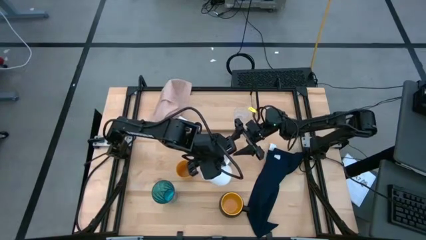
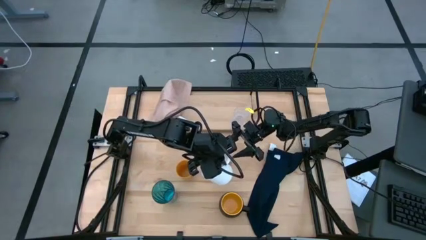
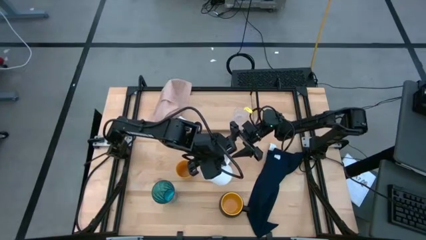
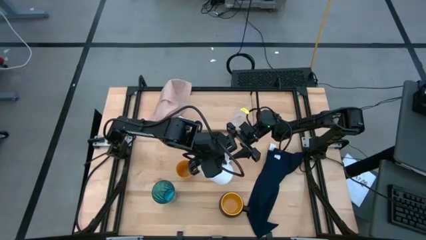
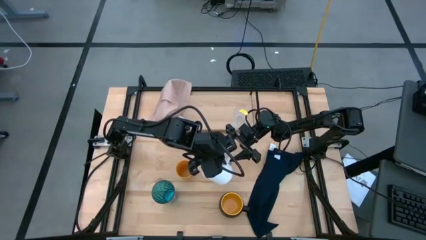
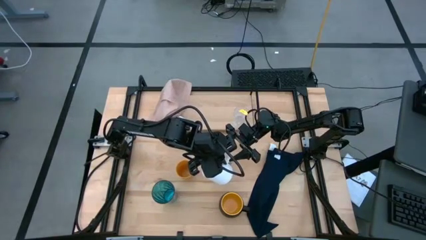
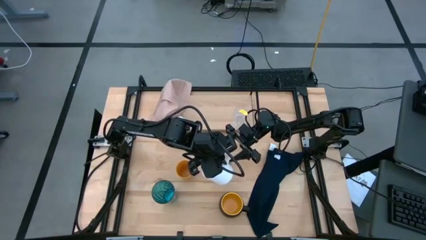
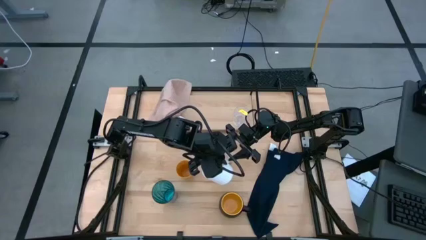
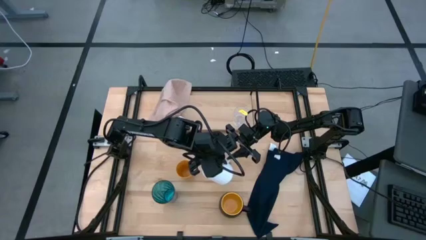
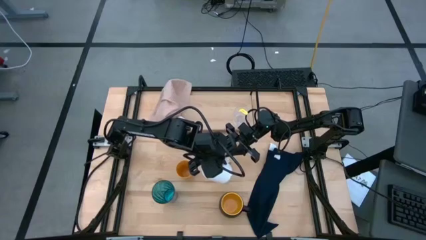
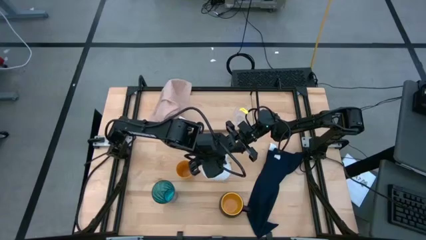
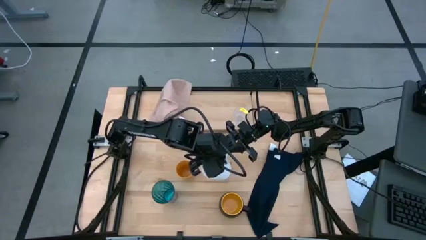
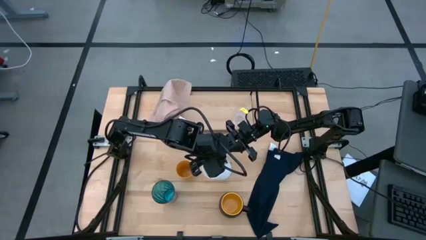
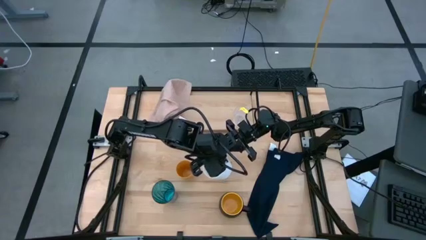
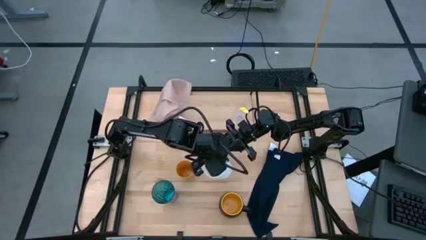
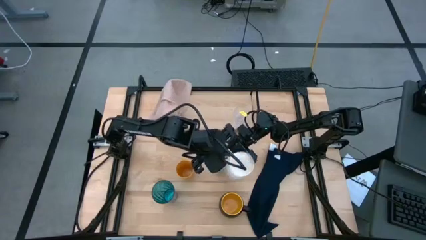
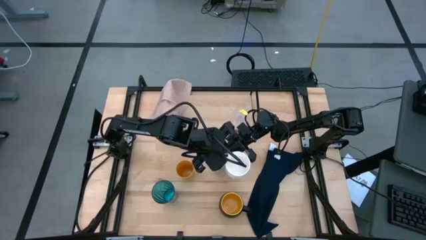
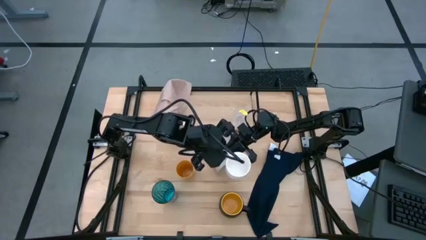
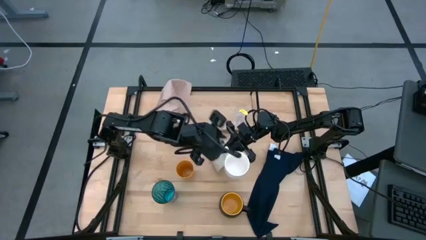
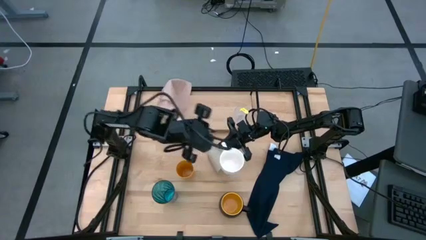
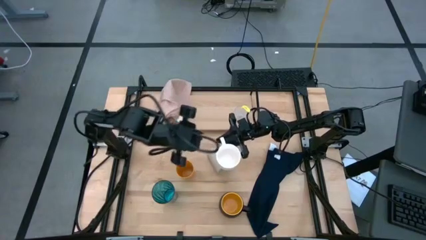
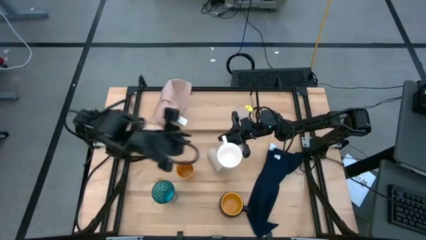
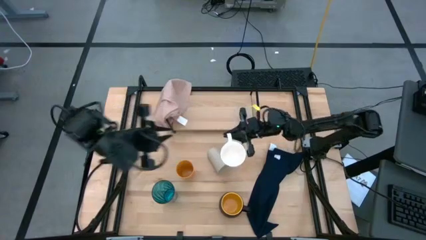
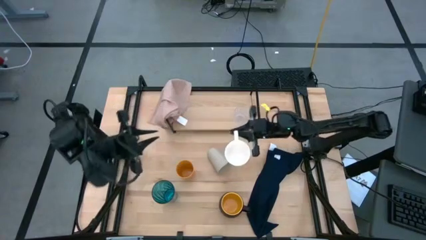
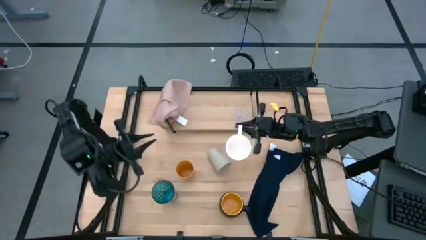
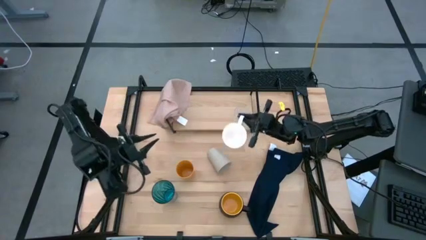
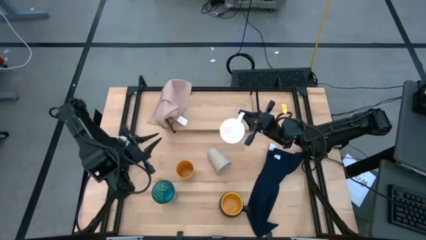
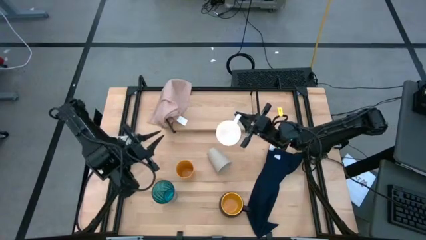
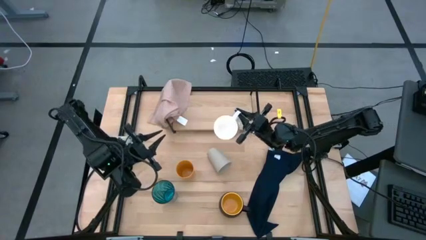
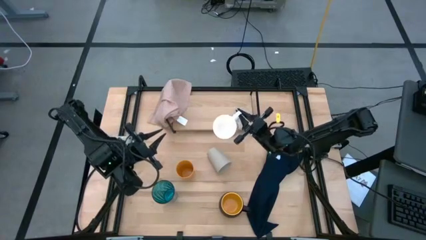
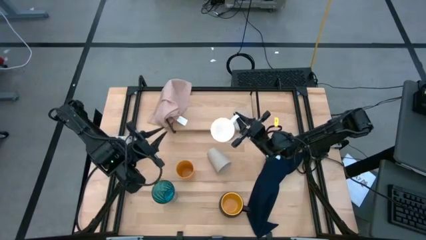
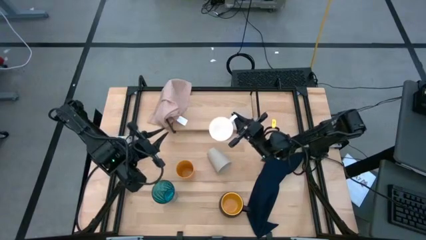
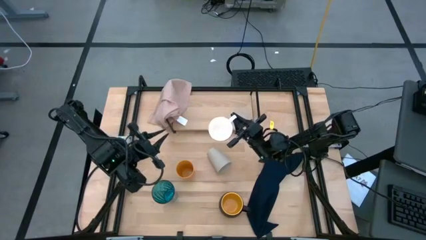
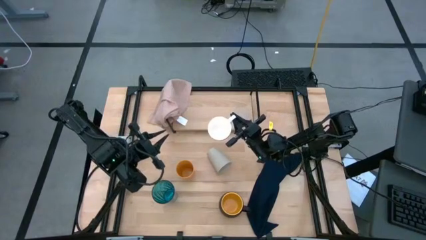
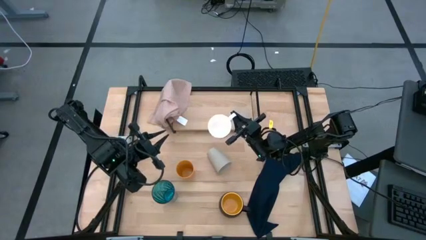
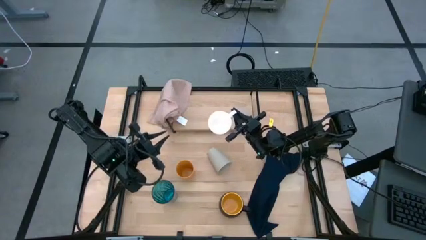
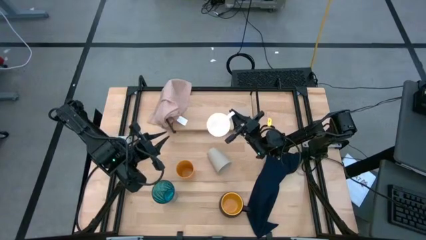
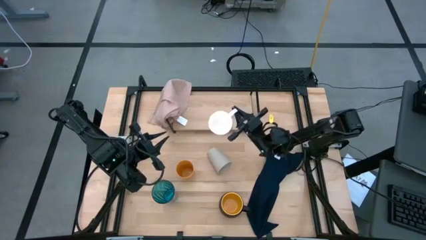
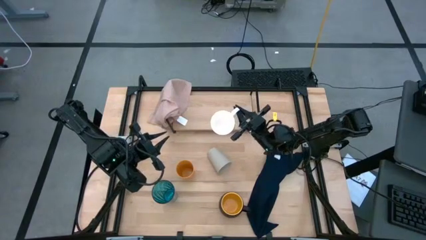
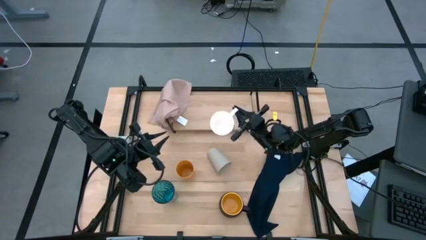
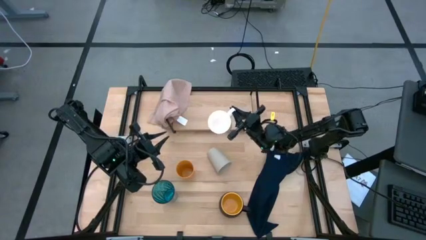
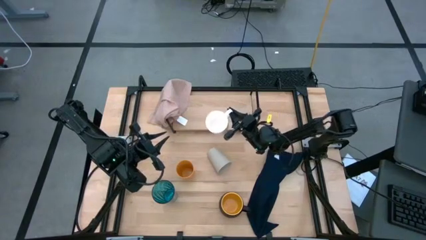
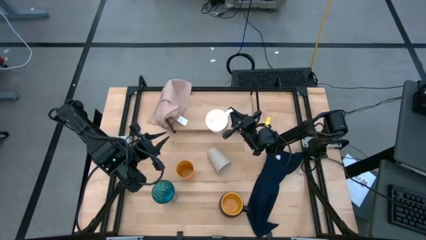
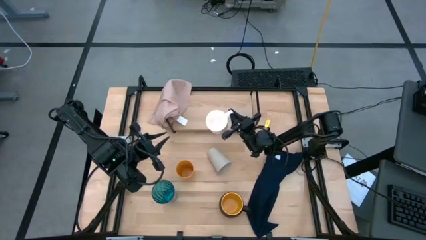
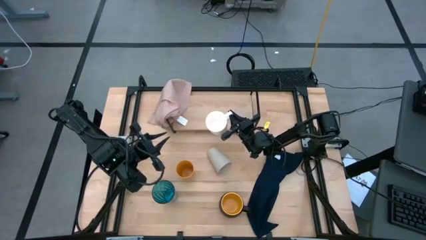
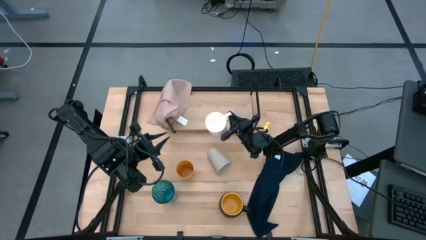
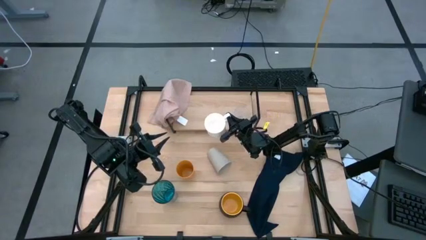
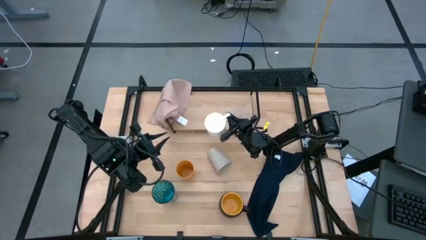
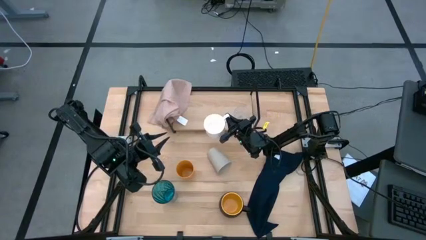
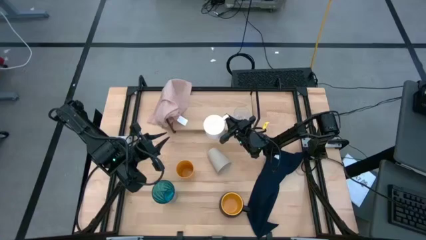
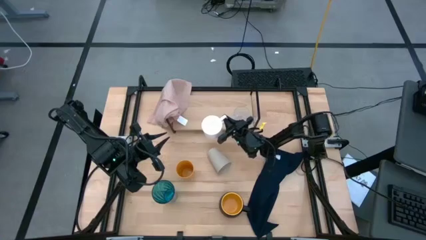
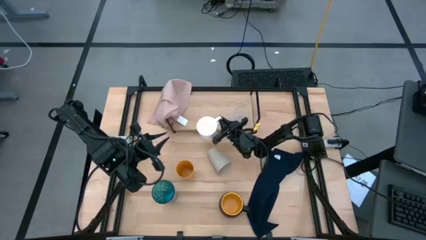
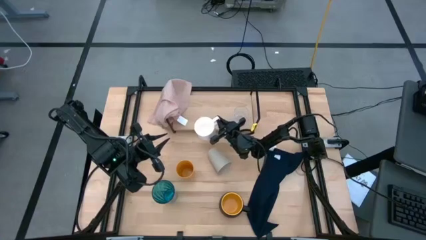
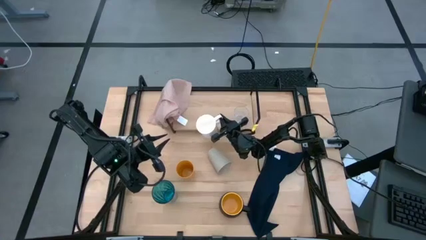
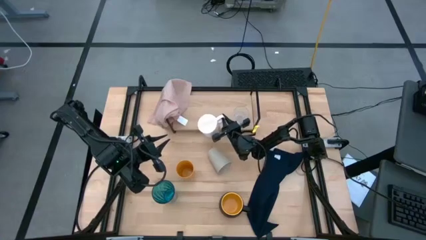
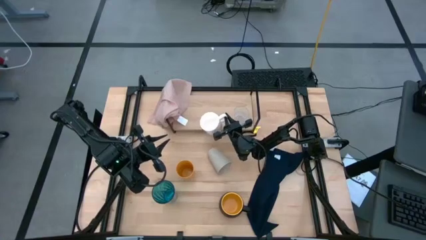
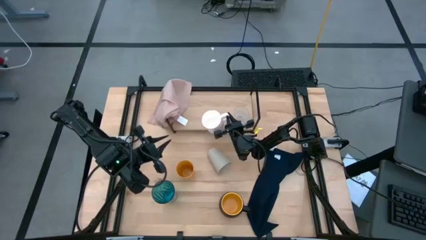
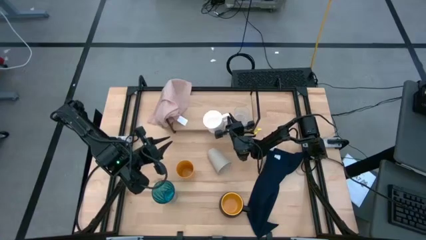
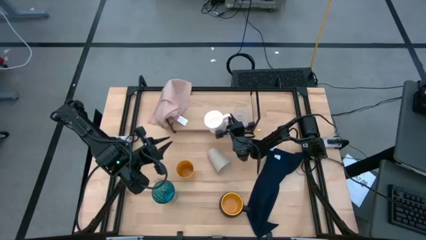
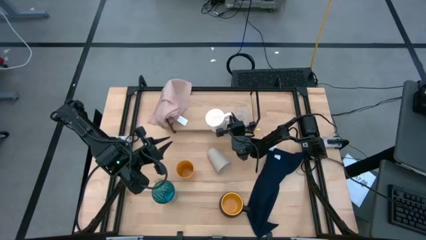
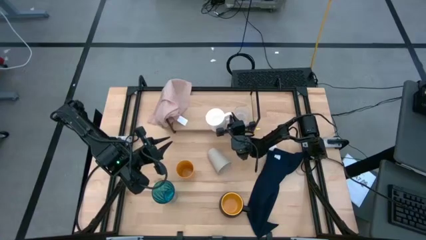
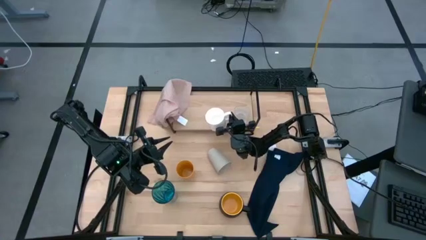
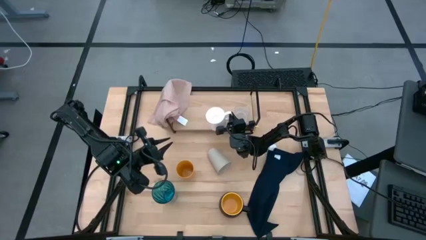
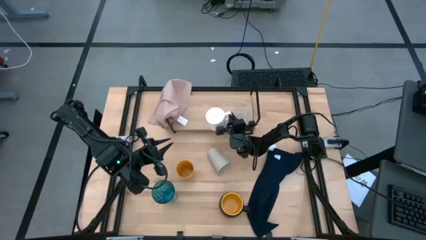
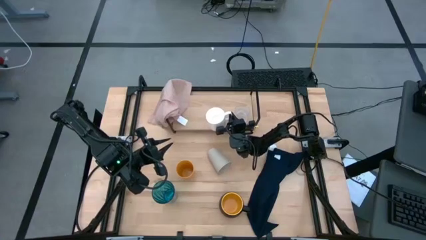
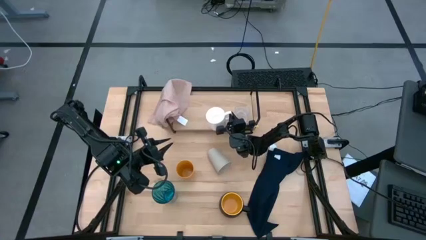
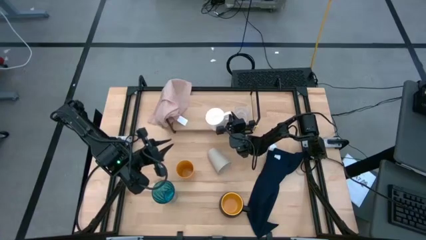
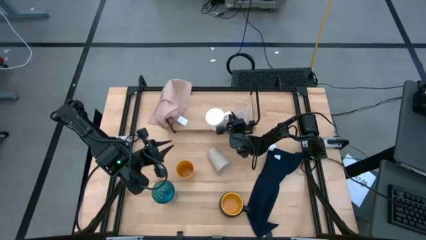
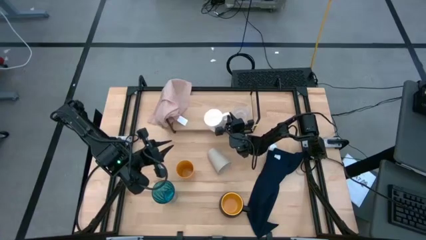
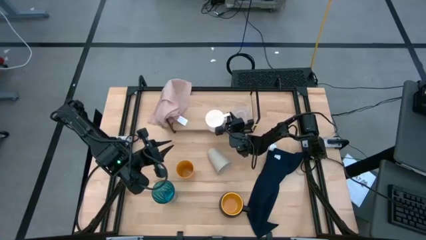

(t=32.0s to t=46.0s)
Task: Stack small to large cups/mugs on shelf
Put the white mug on the shelf
